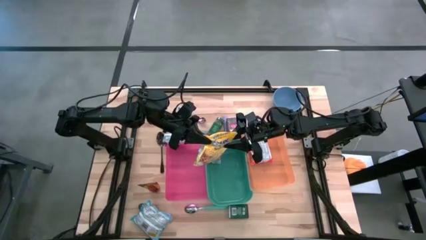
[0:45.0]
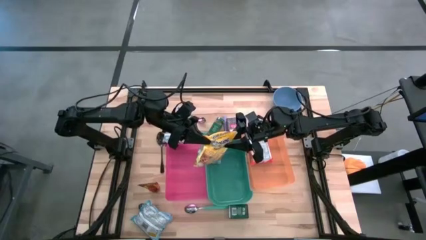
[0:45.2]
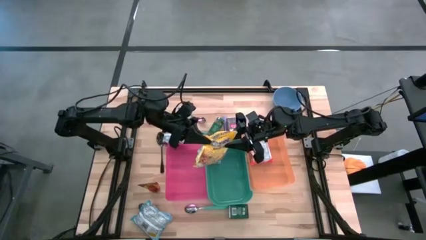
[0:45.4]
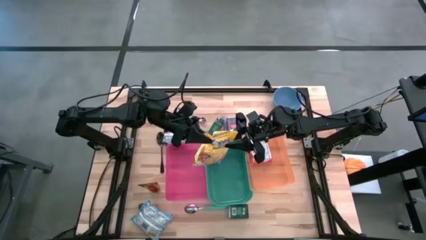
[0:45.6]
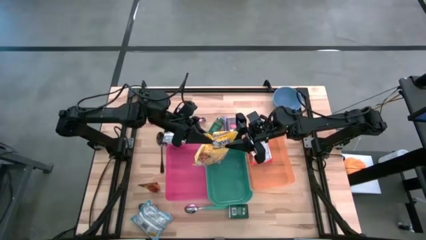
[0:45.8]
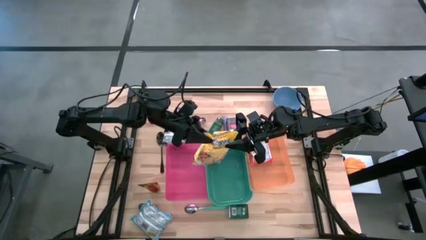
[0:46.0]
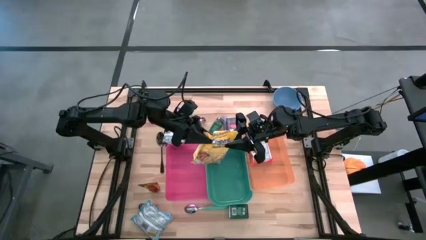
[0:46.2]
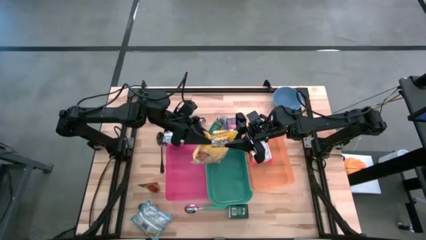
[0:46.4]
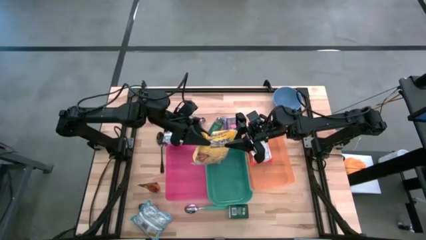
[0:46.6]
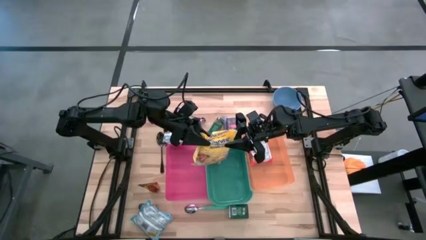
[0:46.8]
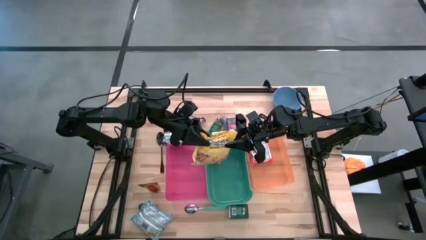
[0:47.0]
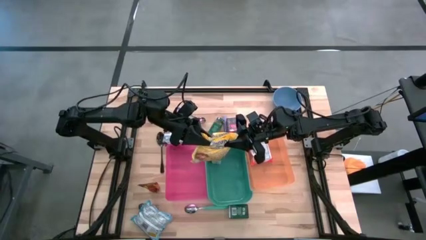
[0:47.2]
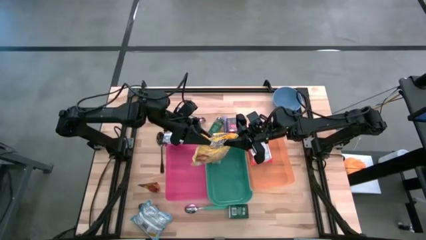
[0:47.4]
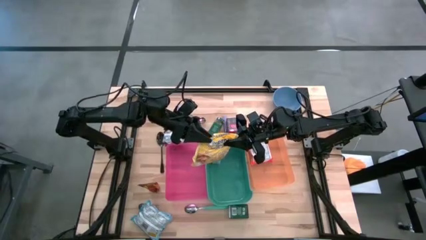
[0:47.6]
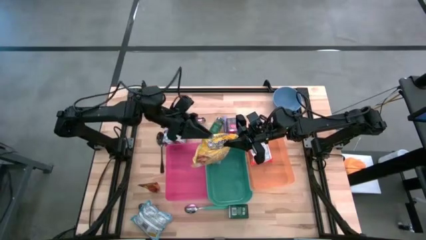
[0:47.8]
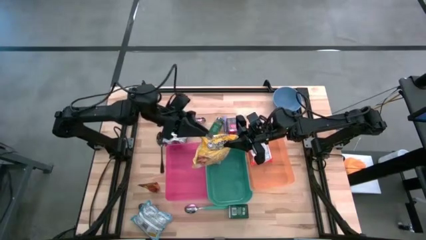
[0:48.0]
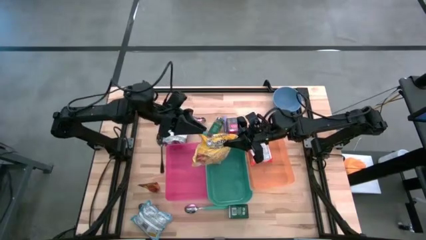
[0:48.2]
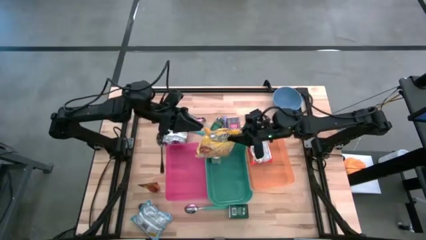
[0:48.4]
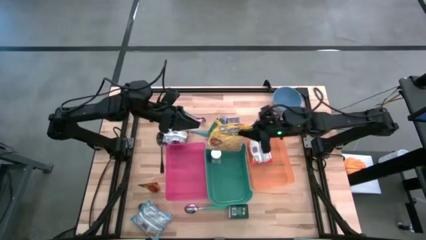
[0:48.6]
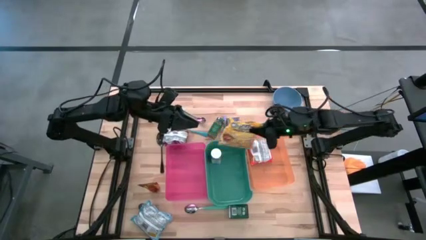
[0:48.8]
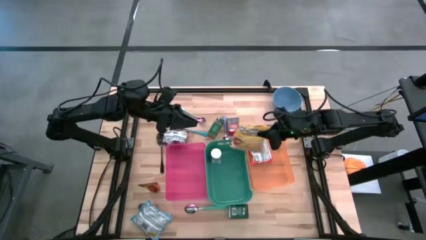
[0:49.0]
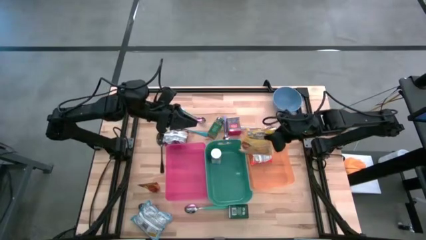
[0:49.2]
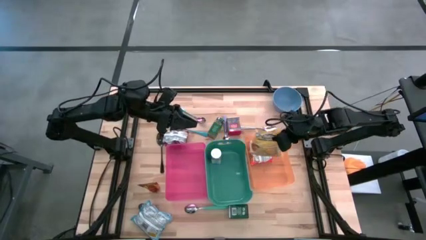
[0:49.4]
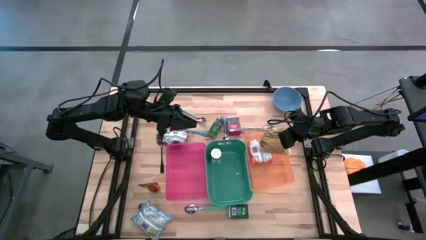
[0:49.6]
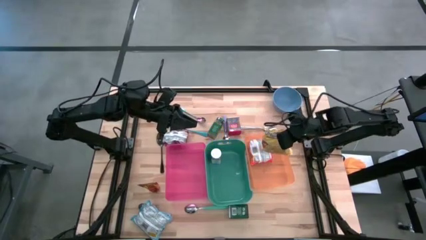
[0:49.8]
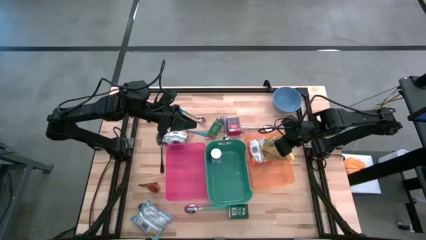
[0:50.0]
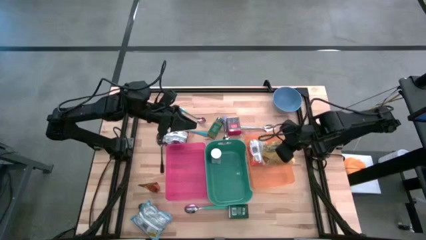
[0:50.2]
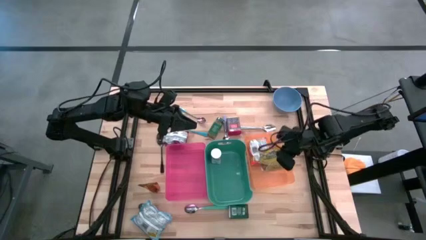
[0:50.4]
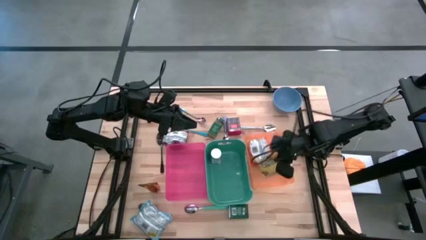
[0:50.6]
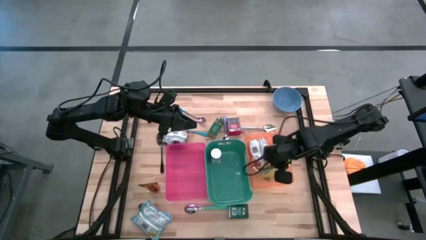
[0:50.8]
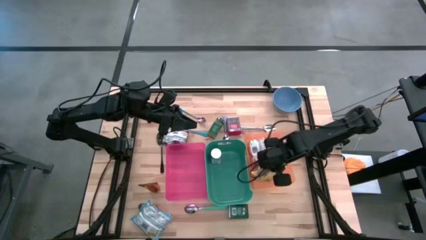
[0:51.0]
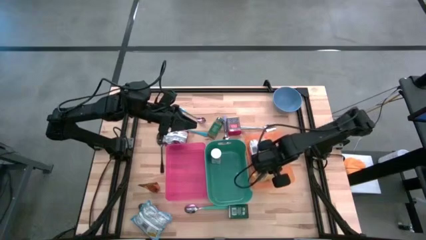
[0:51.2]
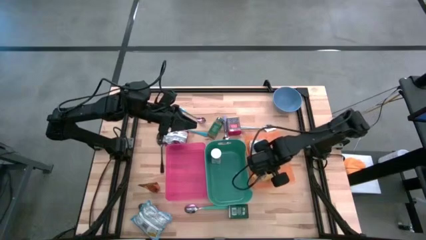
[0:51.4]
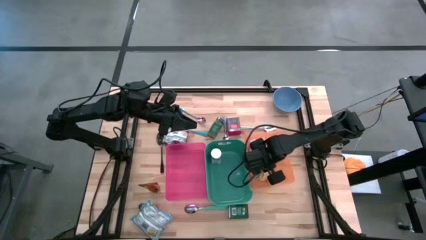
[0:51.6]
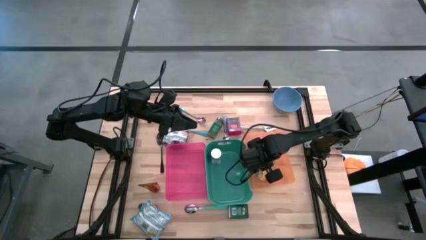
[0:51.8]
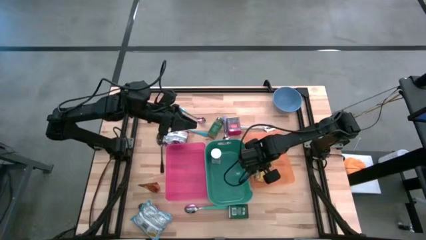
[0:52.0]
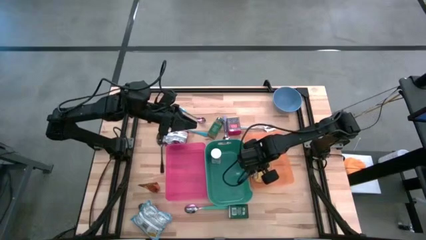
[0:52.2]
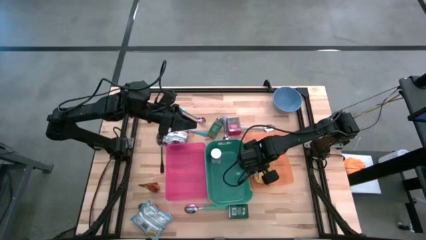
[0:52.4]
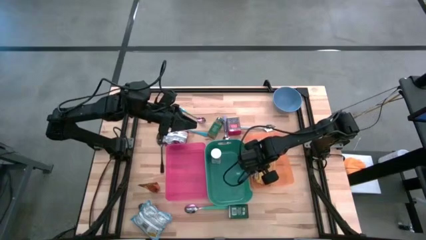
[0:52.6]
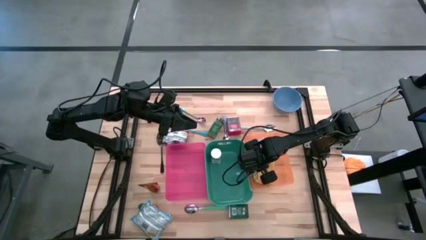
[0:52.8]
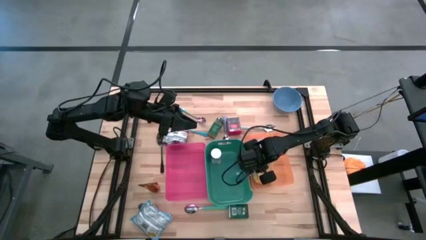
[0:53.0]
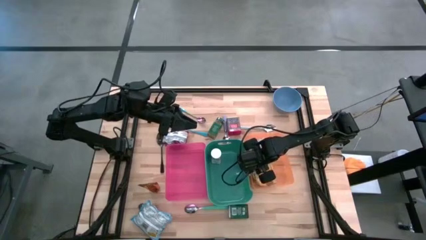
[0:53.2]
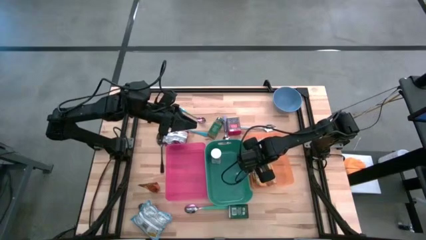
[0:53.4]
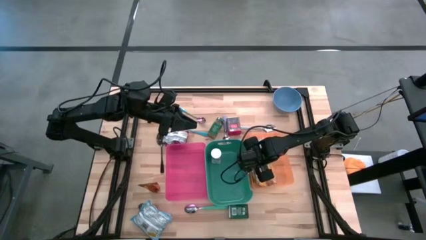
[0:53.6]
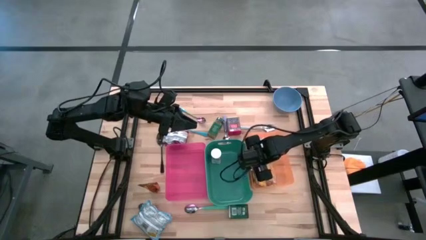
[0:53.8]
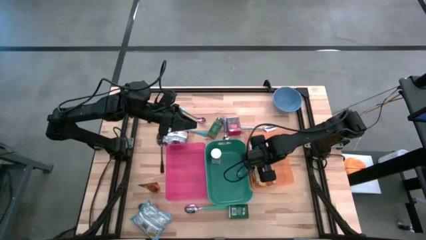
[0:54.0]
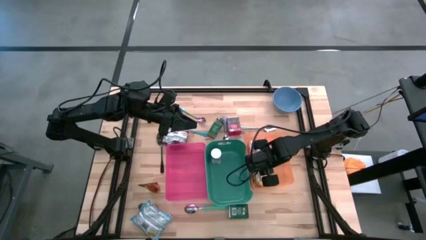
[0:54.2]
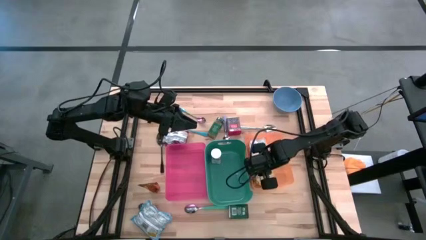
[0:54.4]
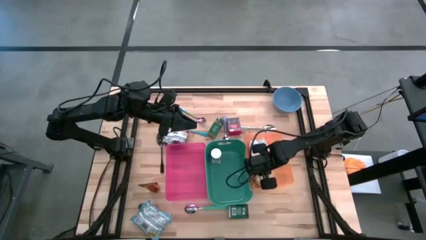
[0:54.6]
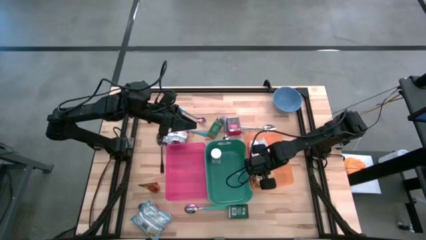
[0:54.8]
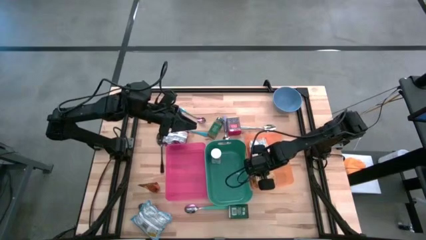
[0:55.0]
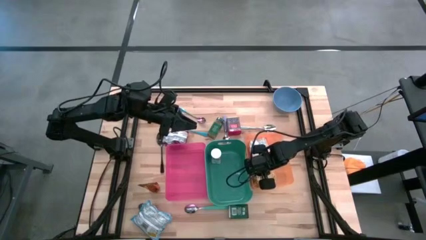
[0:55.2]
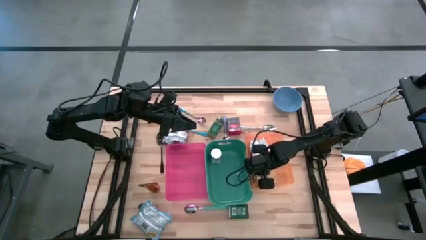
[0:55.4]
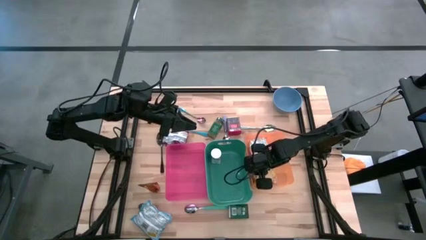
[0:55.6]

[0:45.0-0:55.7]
Put the yellow noodle pack into the orange bin
